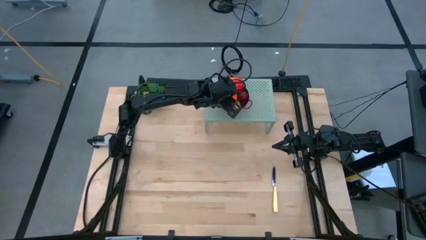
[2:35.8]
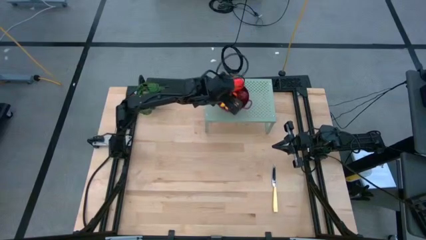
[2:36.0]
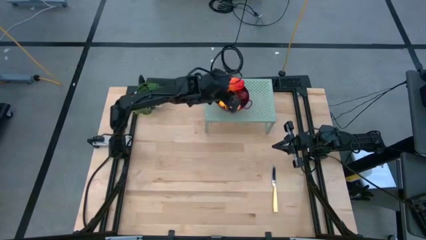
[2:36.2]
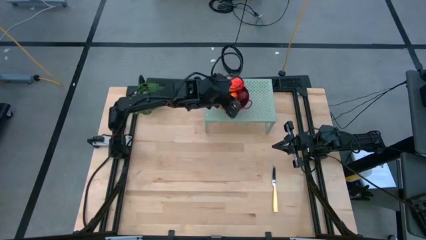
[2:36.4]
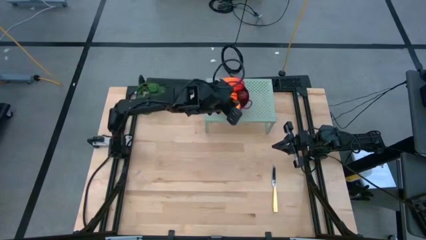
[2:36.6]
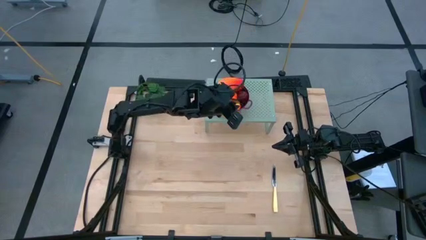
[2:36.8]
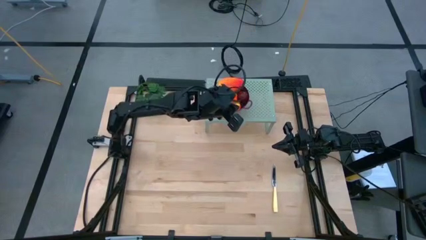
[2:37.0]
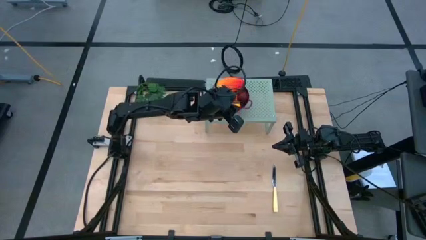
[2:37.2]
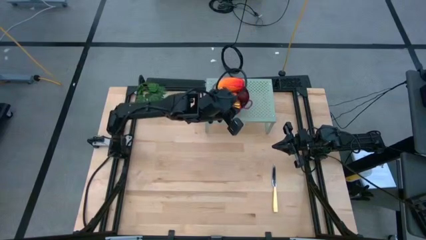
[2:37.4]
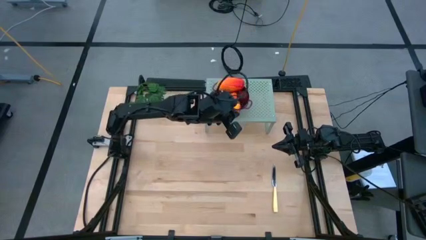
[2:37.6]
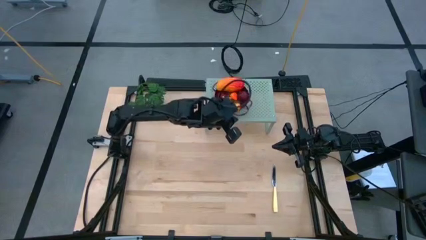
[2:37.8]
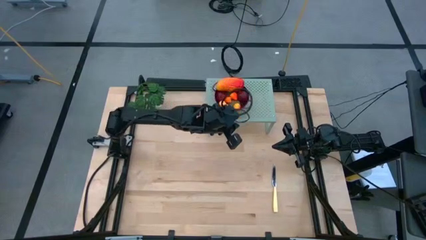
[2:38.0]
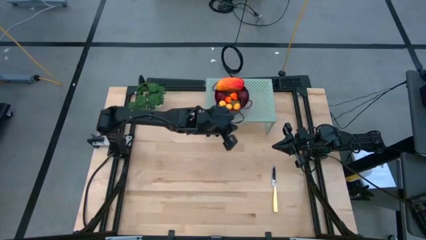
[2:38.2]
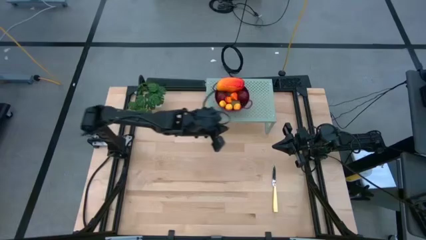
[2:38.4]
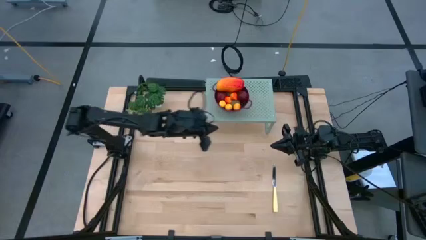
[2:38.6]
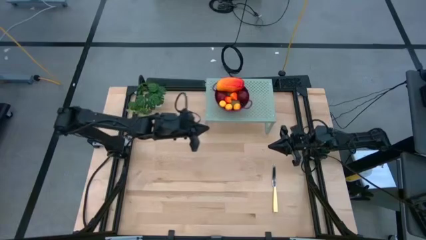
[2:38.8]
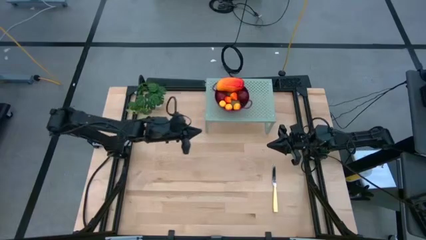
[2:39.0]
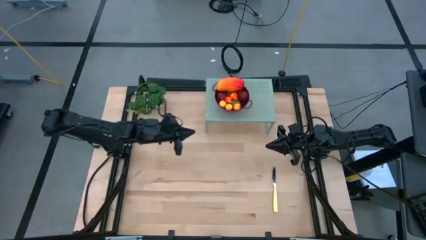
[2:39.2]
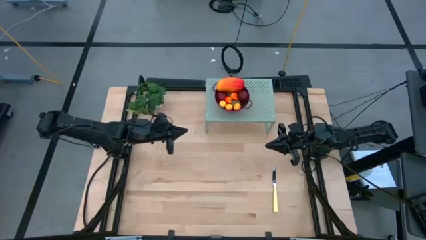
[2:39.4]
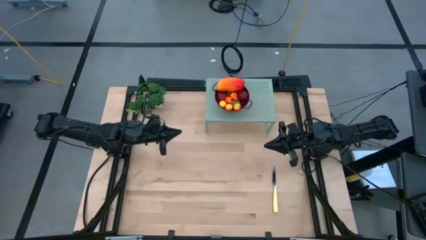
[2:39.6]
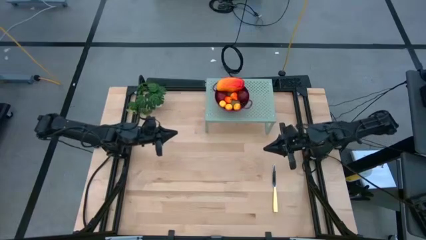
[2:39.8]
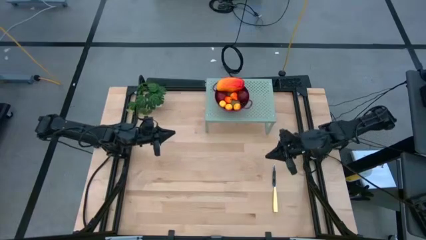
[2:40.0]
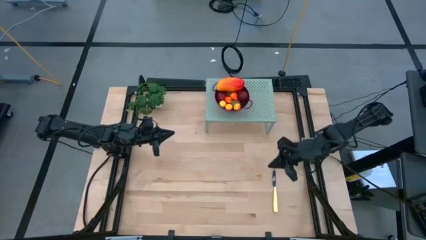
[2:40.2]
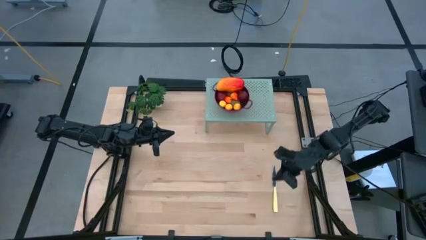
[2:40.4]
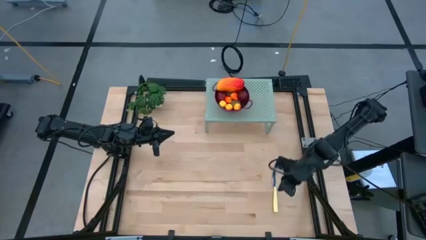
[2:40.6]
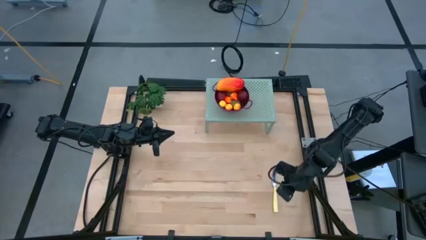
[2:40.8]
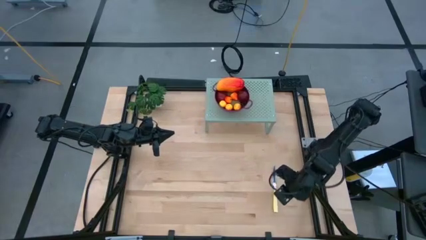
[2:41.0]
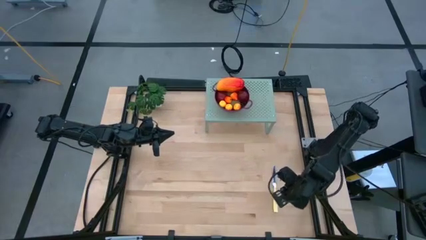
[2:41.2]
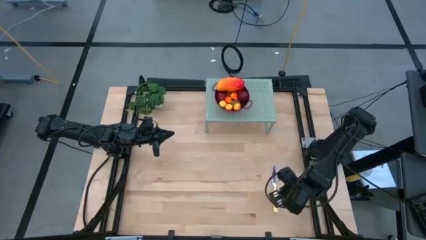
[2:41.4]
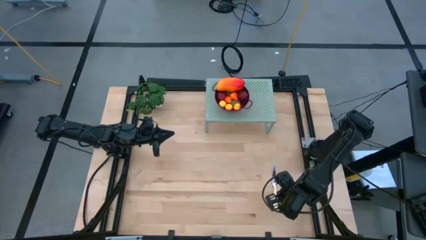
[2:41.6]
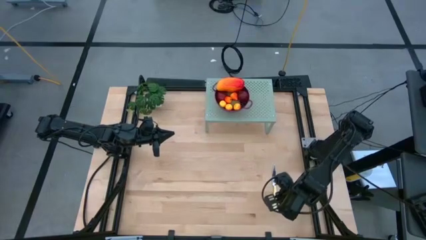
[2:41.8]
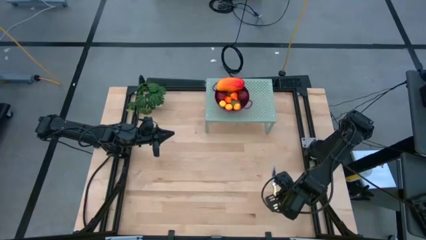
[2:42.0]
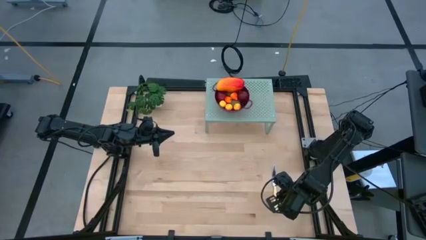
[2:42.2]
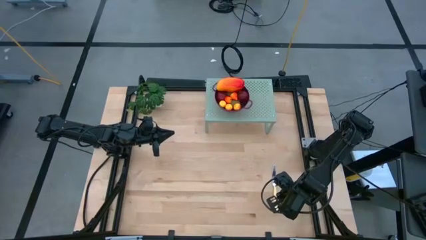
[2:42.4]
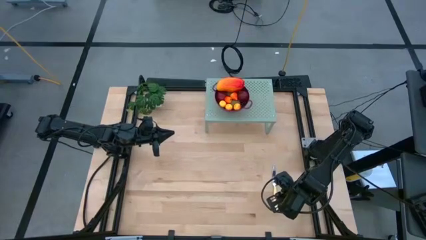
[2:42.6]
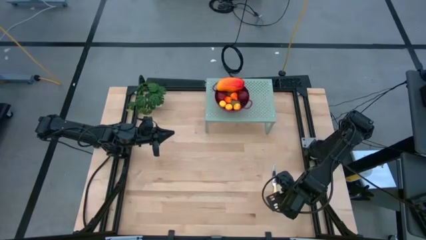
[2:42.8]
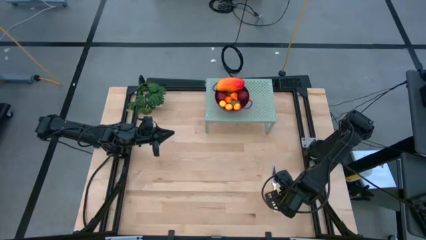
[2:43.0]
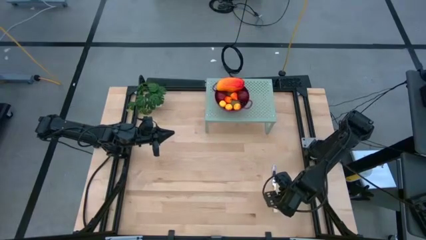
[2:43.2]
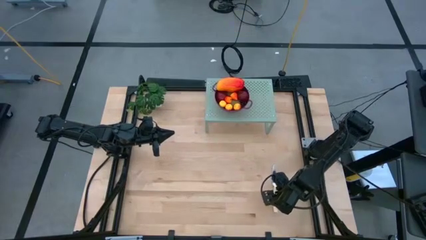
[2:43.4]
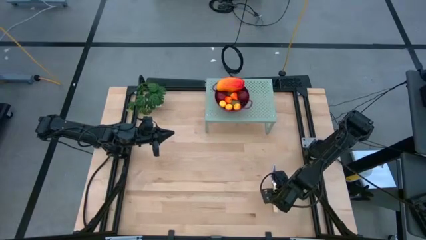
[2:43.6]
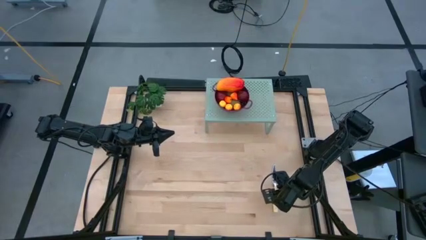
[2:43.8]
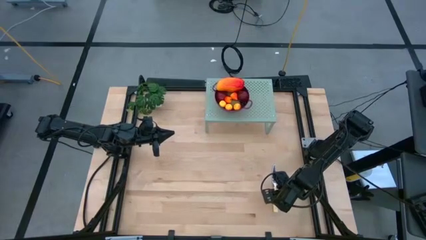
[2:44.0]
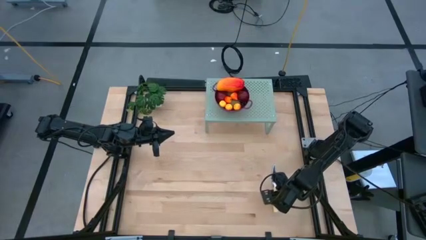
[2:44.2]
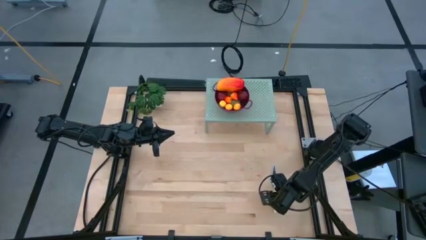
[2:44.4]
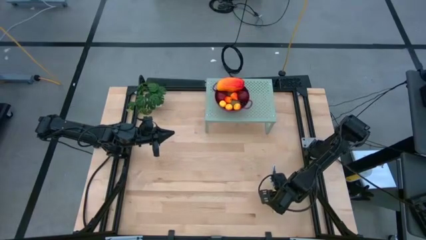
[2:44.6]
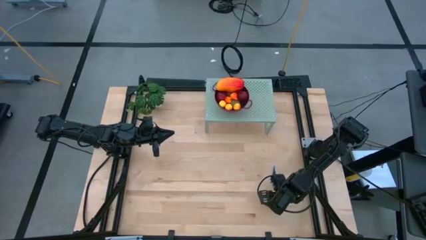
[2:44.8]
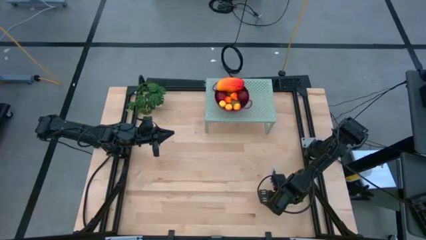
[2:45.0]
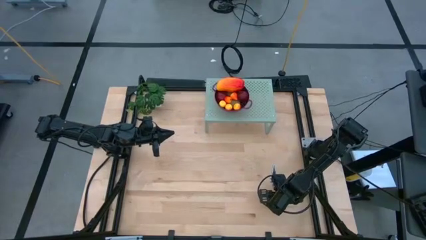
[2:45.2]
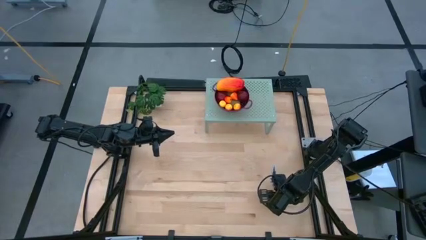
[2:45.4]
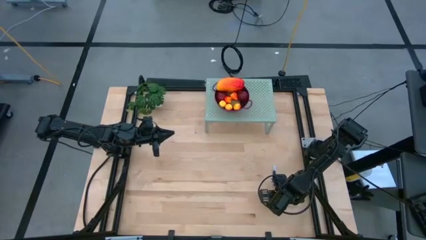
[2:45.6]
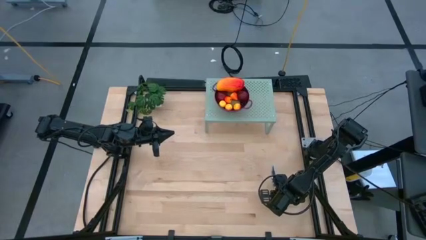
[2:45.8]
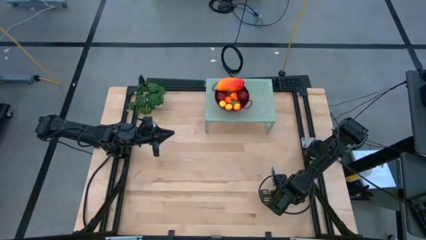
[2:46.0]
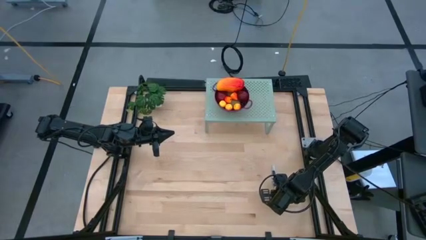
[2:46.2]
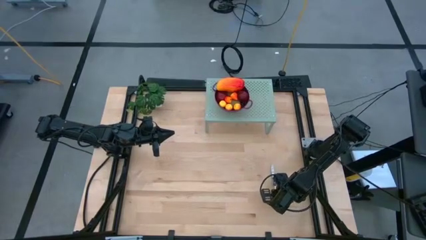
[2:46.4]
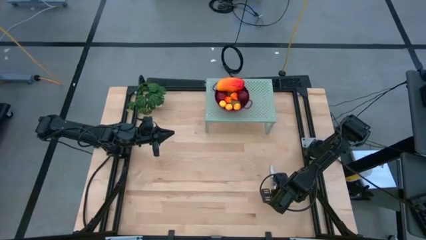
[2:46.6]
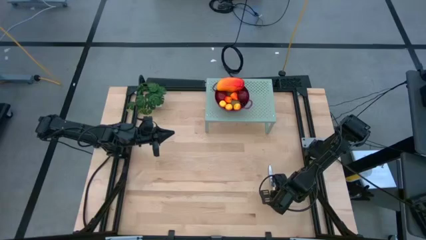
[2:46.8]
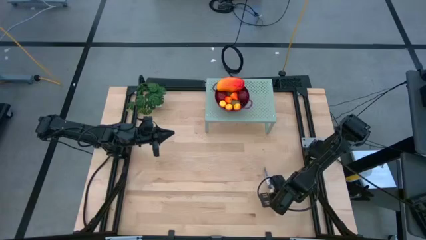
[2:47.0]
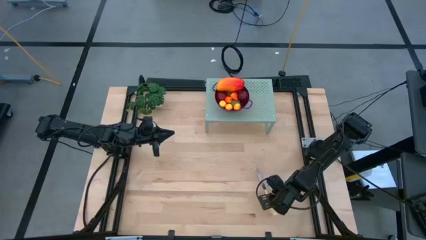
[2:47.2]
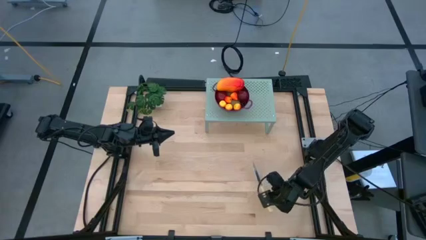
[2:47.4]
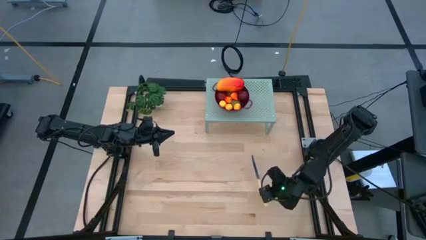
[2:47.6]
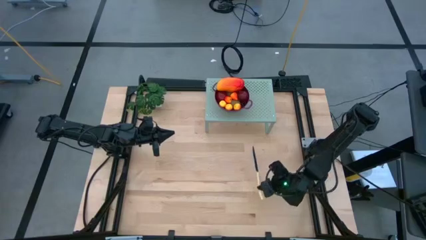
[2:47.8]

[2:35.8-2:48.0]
Task: Pick & Place Fruit
Put the knife on the shelf on the right of the strainer bowl

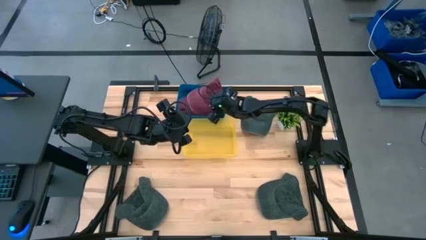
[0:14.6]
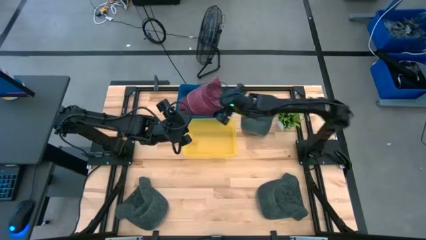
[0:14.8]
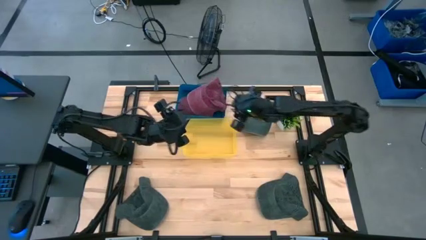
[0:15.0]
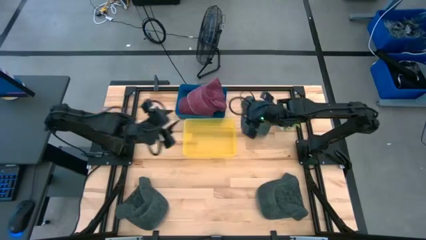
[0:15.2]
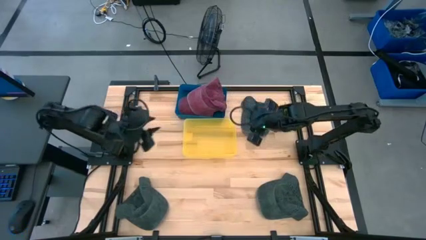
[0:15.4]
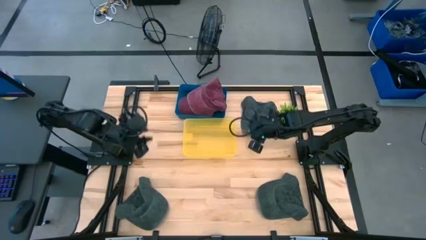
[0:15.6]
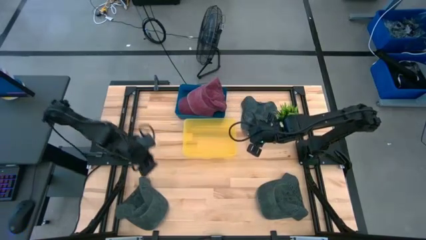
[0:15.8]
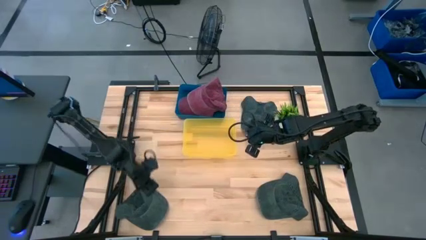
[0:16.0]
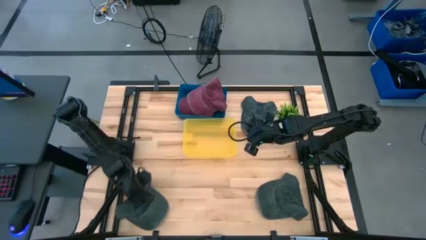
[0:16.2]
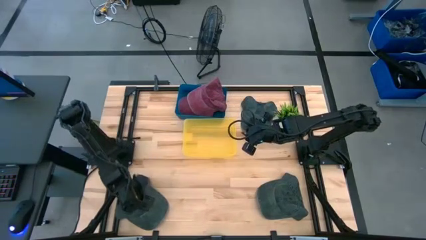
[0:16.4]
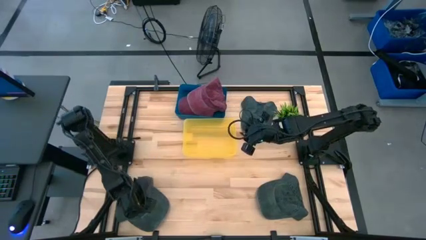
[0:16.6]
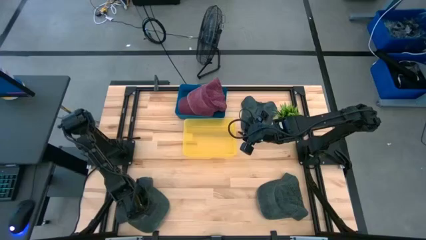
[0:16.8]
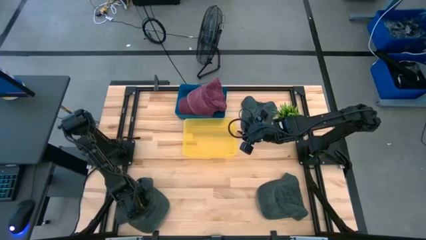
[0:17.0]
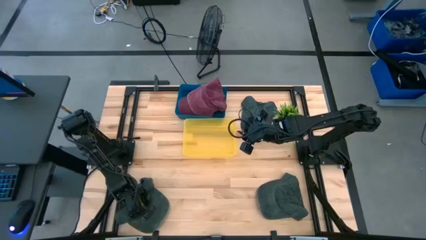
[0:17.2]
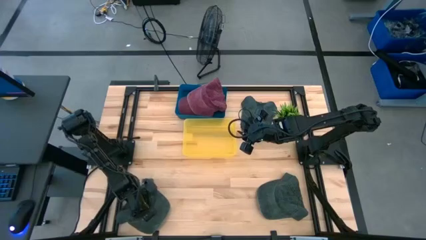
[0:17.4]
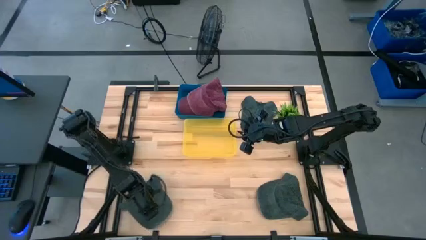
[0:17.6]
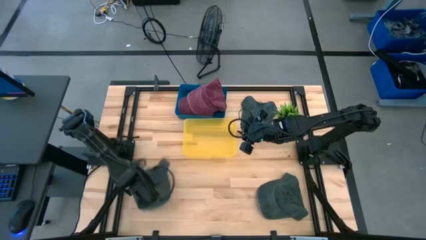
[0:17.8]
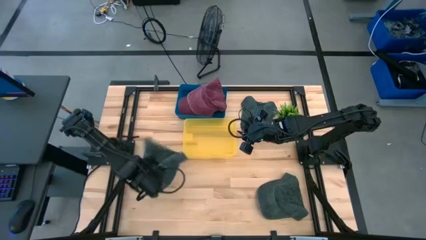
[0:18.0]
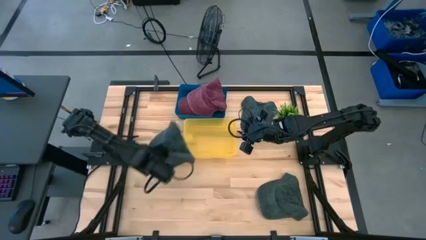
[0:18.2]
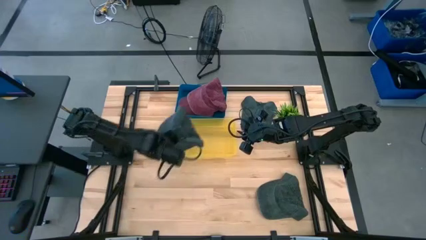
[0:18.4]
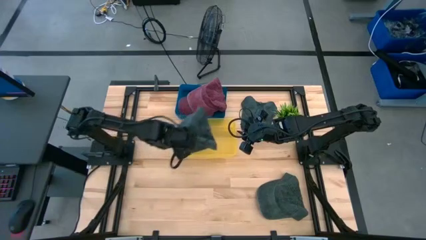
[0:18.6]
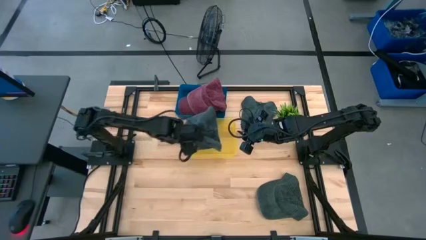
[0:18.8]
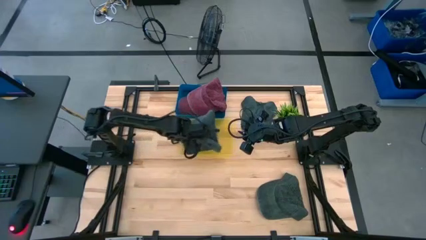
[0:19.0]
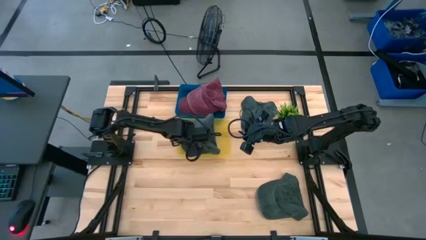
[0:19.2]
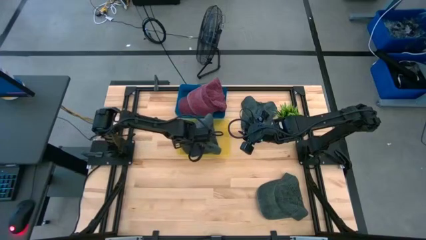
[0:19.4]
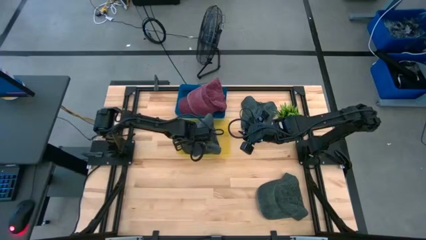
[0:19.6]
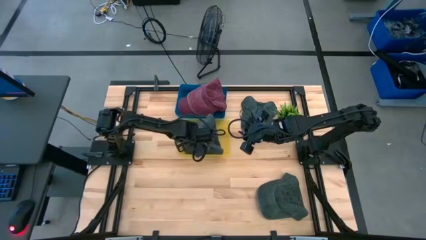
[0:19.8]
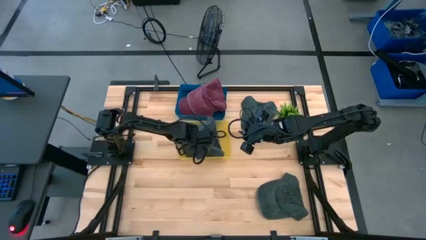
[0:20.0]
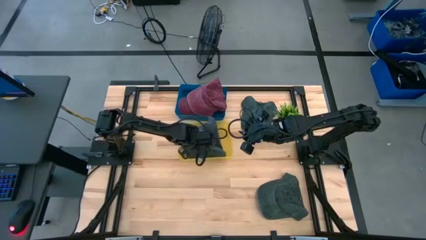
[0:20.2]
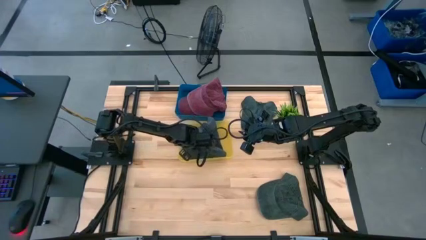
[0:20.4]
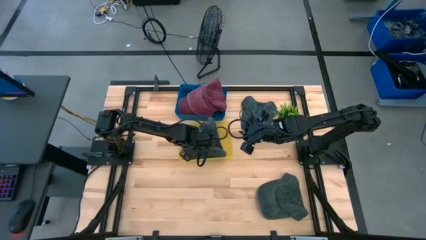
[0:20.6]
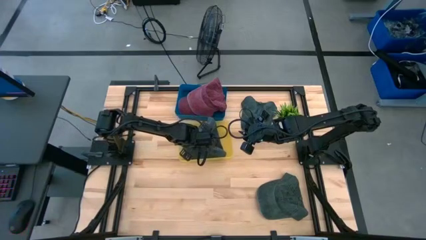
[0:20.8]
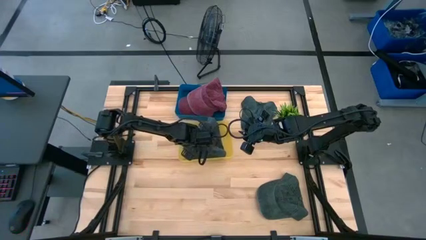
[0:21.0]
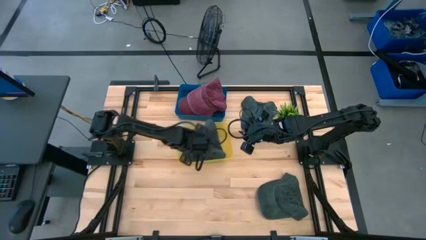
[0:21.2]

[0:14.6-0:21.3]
Task: Pick & Place hat
Put the left grey cap into the yellow bin
